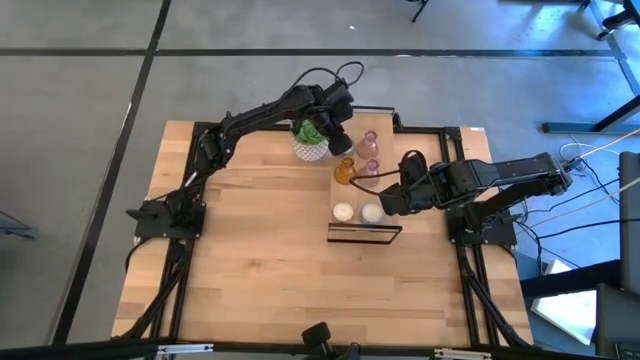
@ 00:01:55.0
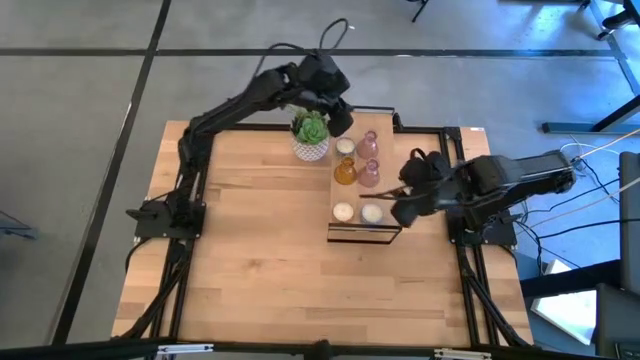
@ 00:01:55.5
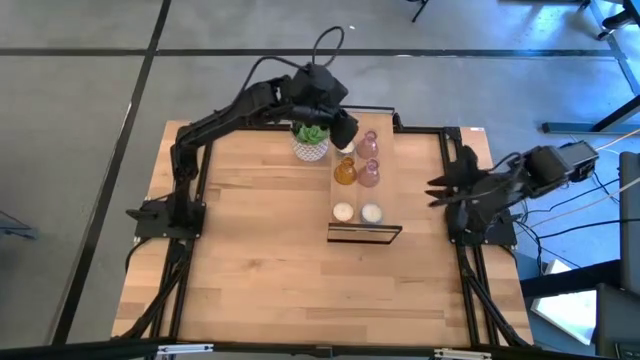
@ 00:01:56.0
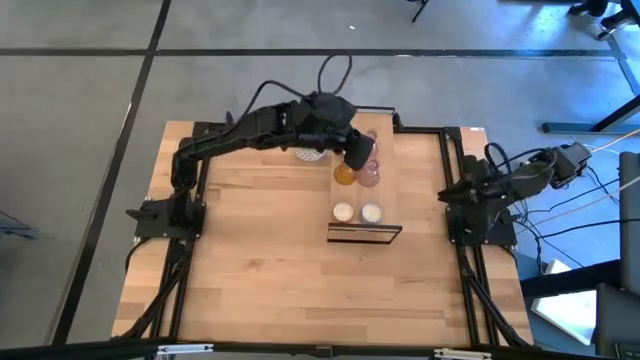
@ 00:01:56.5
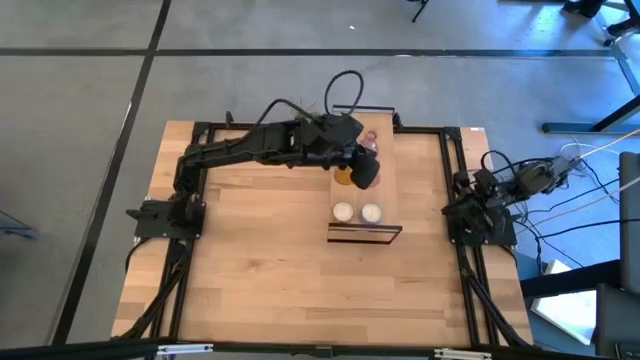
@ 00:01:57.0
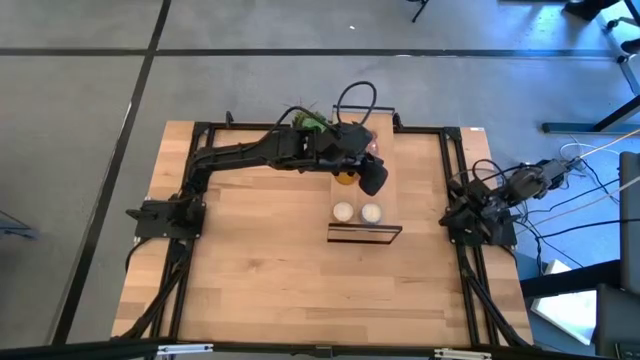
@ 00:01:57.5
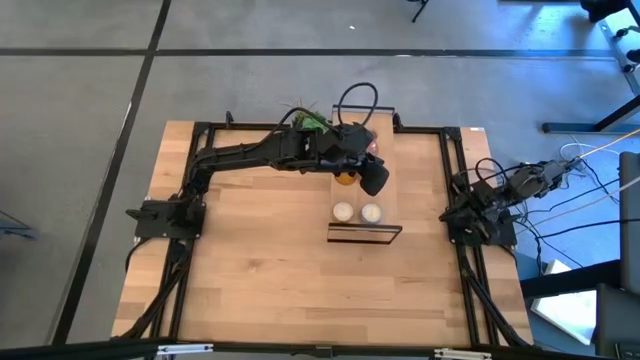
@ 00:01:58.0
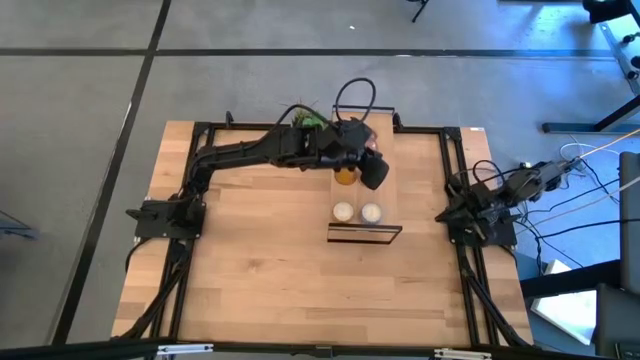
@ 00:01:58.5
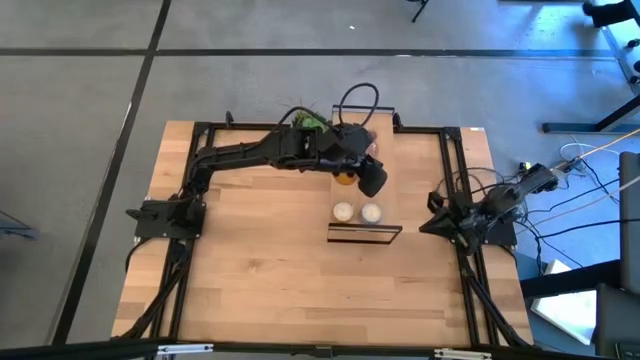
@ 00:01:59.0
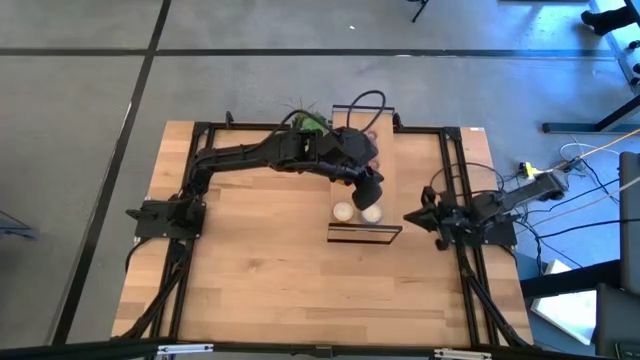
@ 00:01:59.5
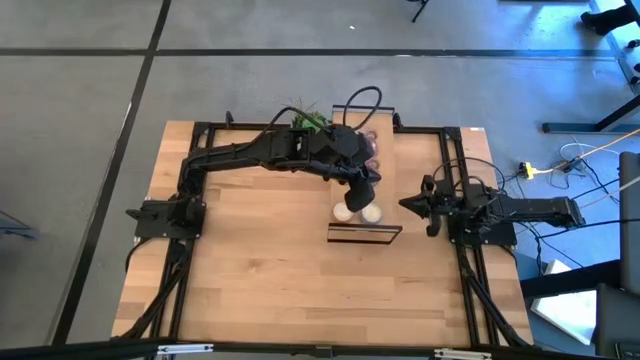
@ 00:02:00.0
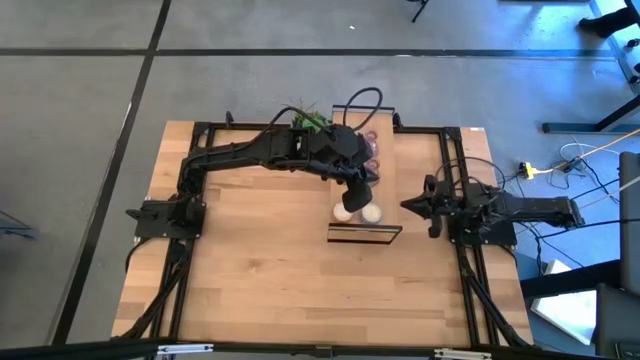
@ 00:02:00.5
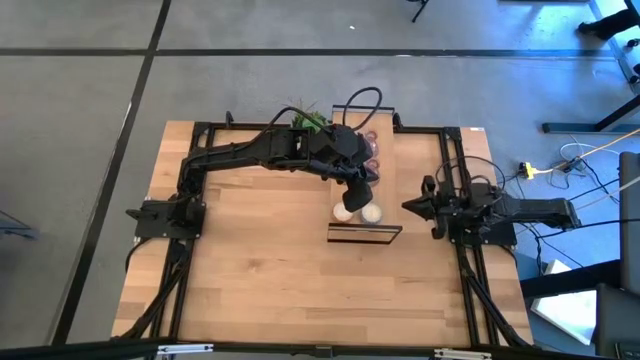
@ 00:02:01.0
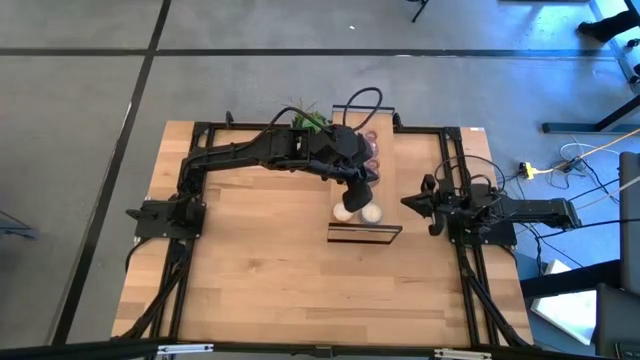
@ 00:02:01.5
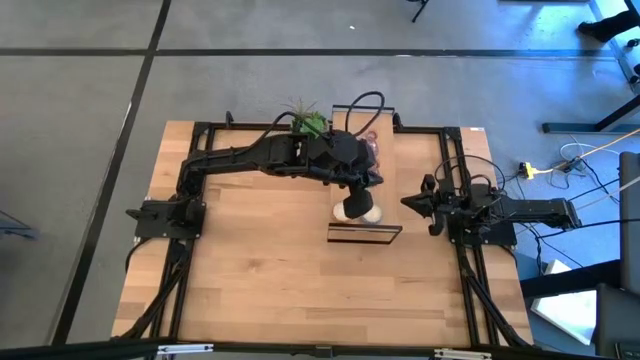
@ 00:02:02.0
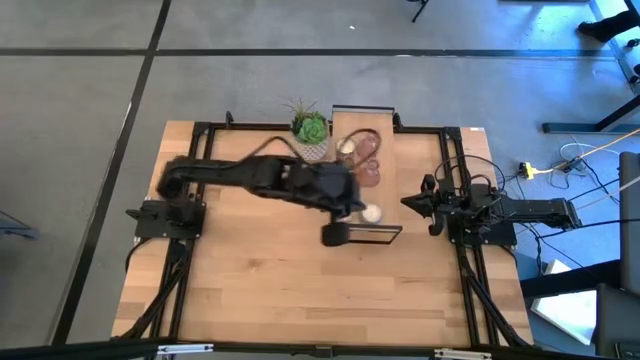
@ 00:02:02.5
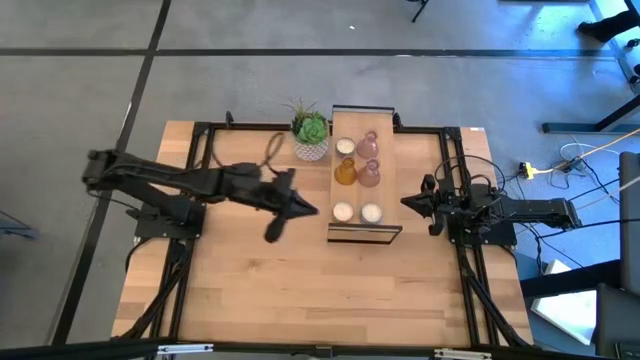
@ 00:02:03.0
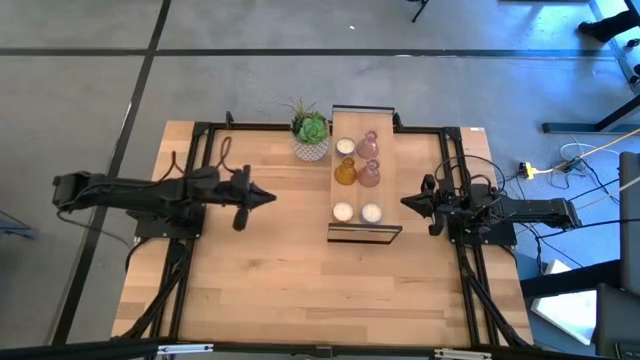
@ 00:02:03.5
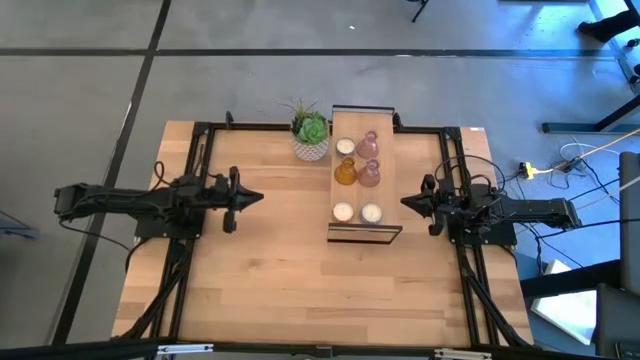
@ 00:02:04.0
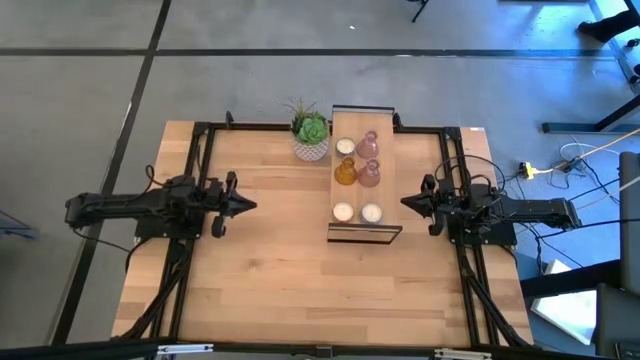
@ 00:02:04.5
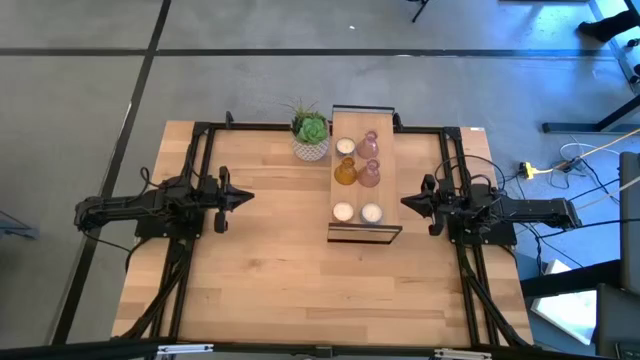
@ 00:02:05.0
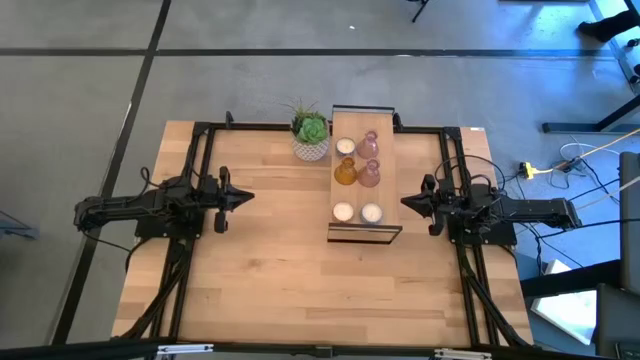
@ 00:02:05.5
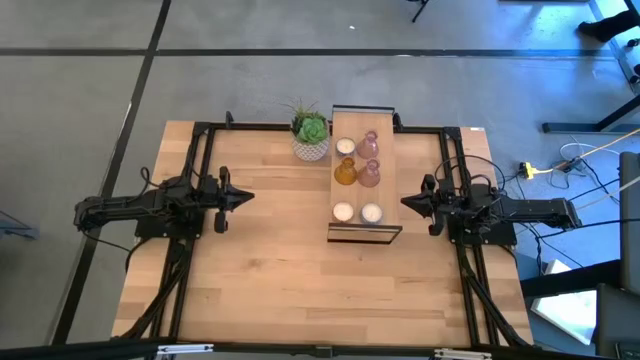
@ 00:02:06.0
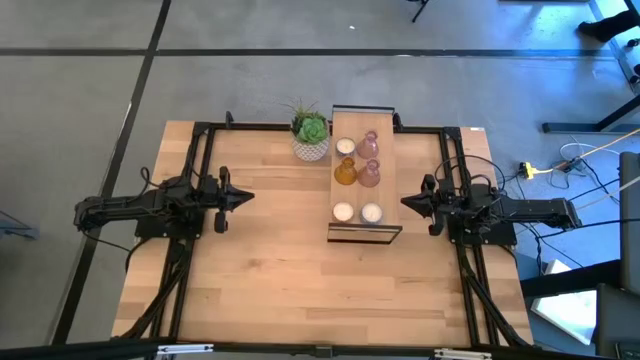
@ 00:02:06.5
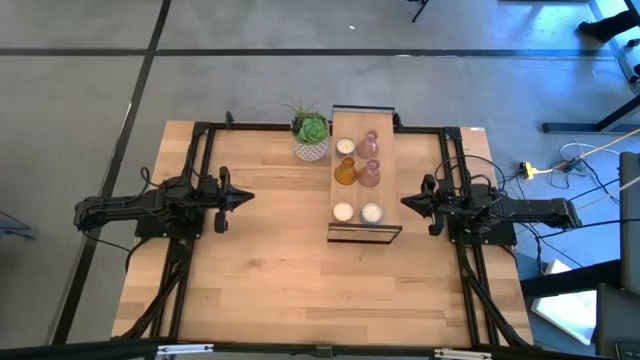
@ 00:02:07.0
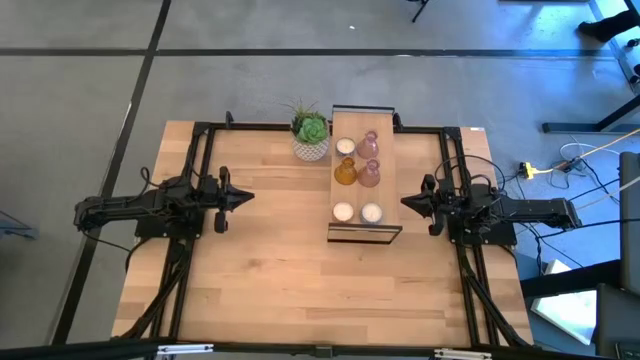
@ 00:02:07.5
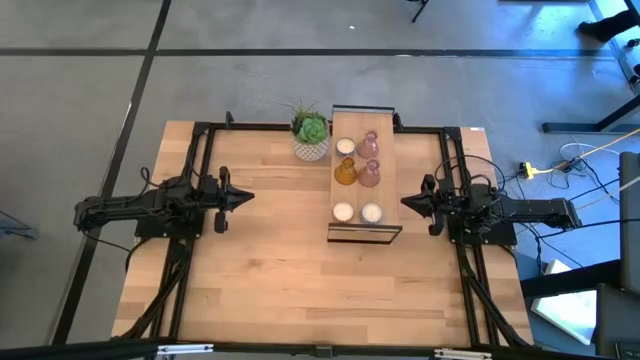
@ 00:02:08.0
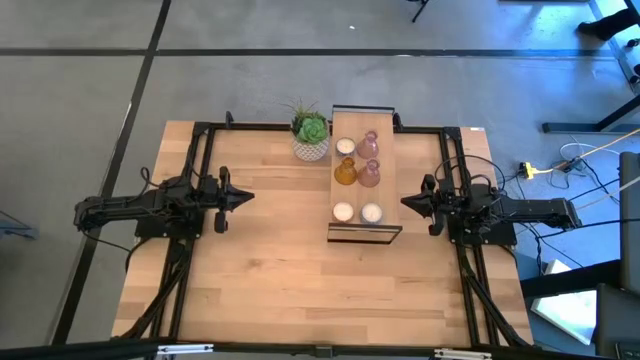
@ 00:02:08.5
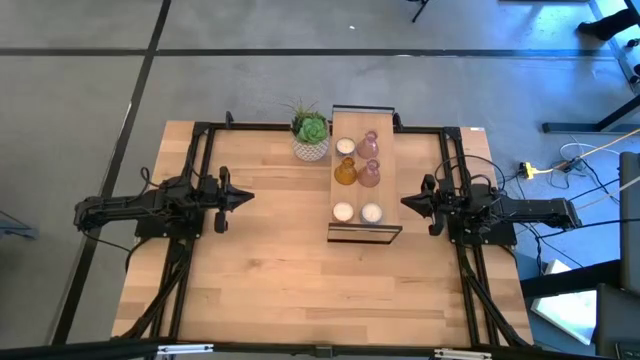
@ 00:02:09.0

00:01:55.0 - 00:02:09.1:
Task: Pick & Place candle stick holders
Return to Home Position

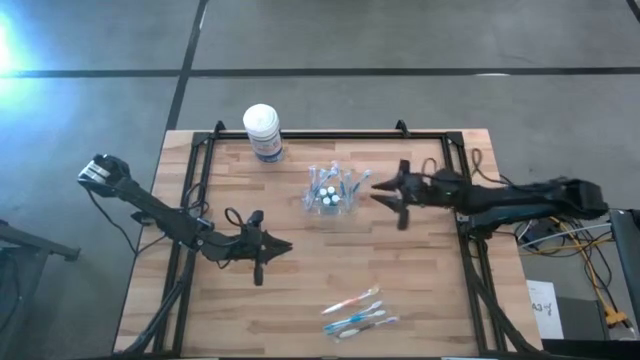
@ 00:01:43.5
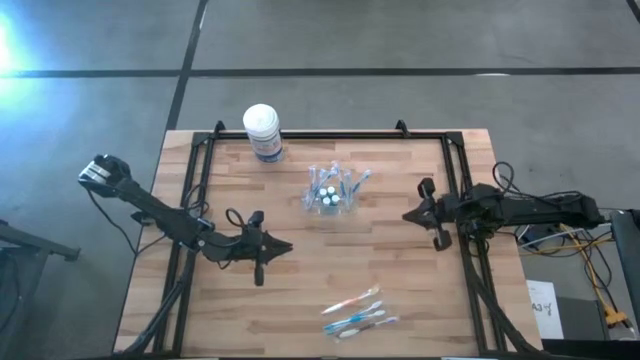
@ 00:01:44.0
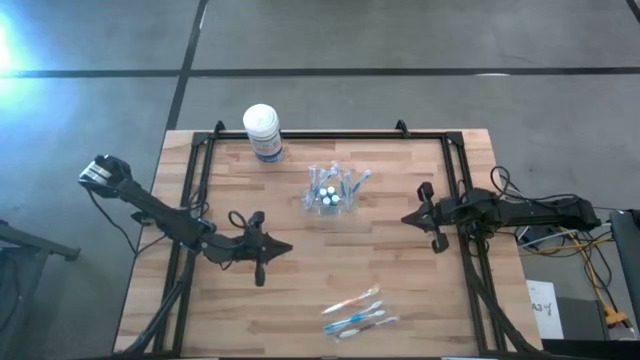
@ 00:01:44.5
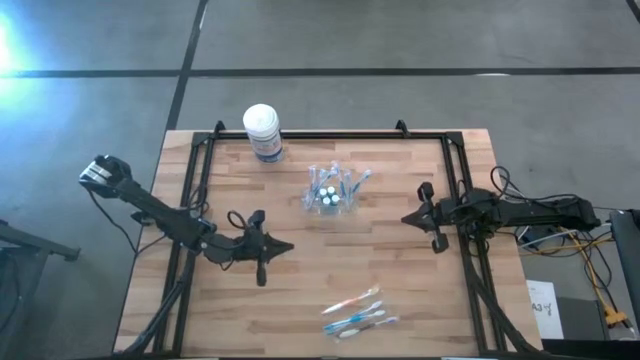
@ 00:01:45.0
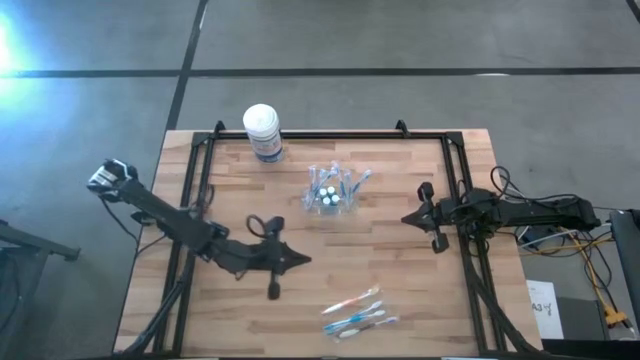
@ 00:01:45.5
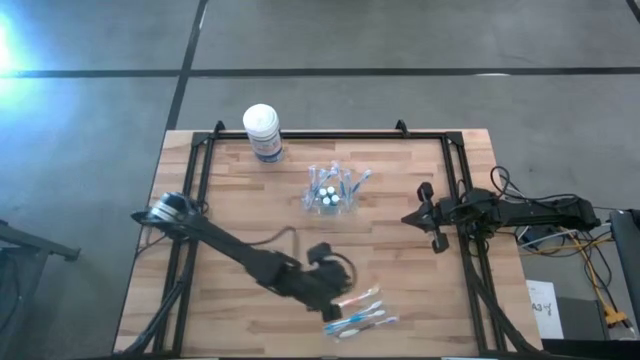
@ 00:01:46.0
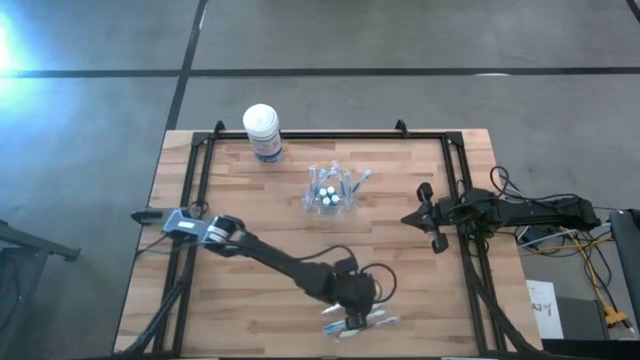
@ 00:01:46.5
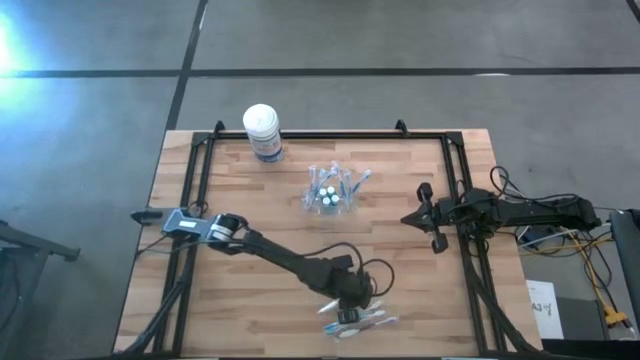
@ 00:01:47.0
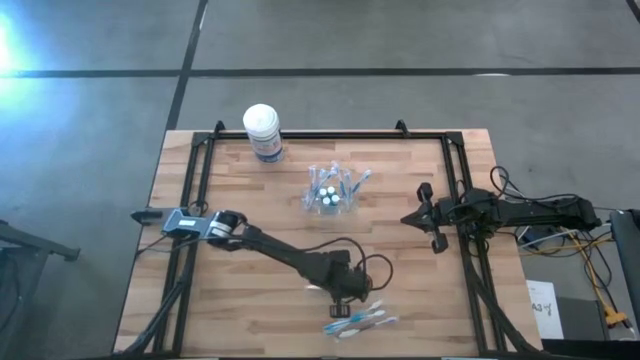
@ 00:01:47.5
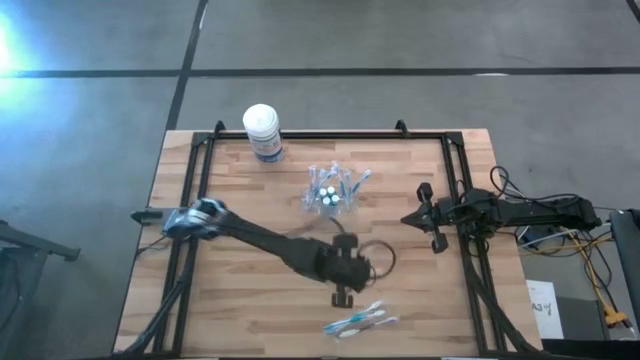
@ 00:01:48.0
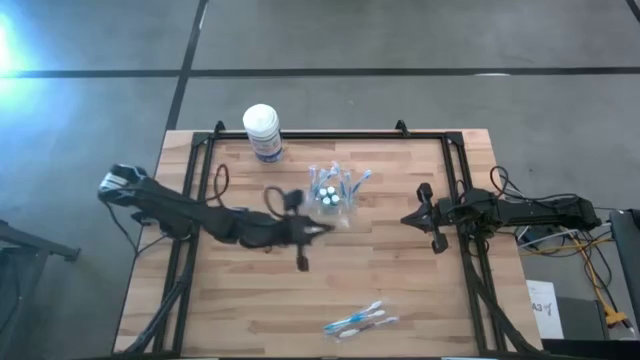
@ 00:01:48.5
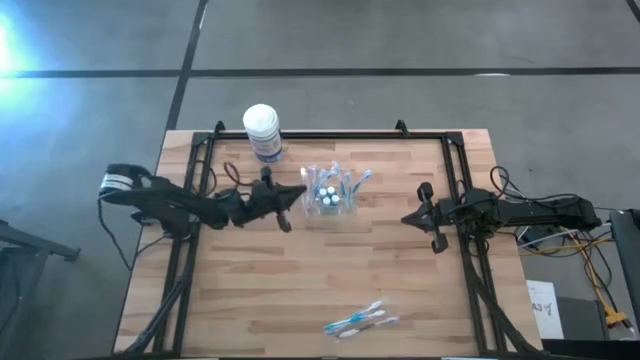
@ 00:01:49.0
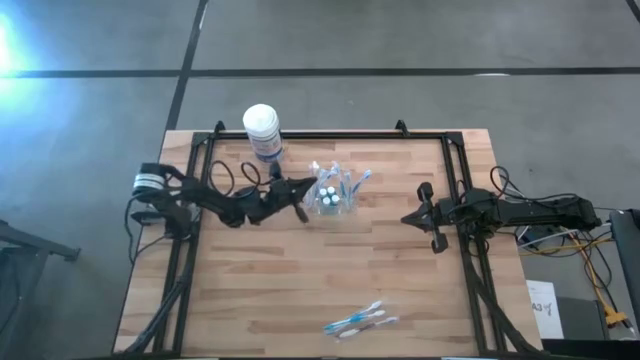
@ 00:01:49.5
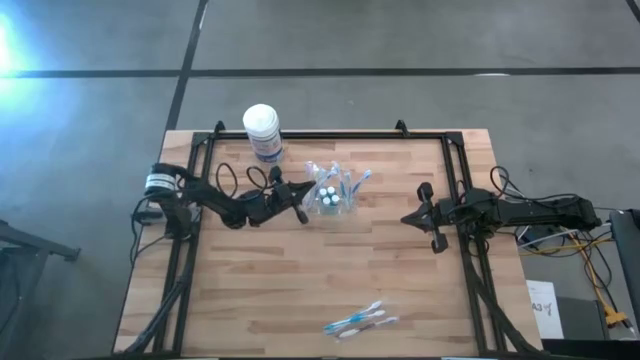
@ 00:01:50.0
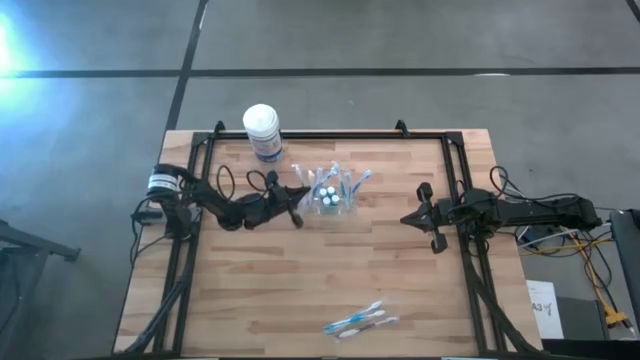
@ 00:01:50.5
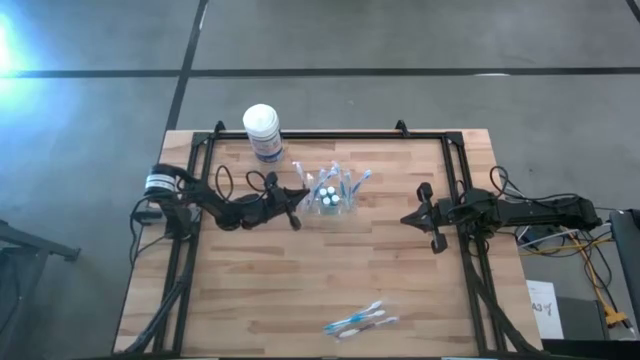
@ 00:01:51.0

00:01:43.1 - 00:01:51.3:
Task: Pick & Place toothbrushing station
Put the orange toothbrush into the transparent organizer
